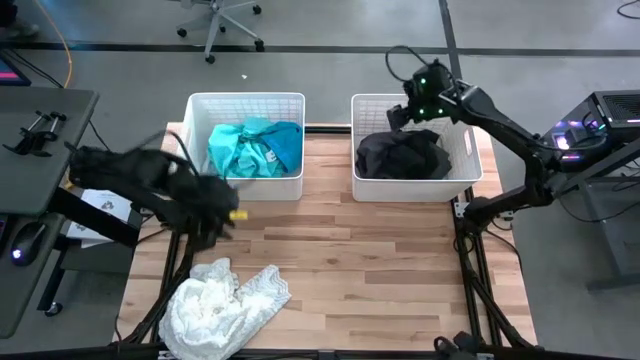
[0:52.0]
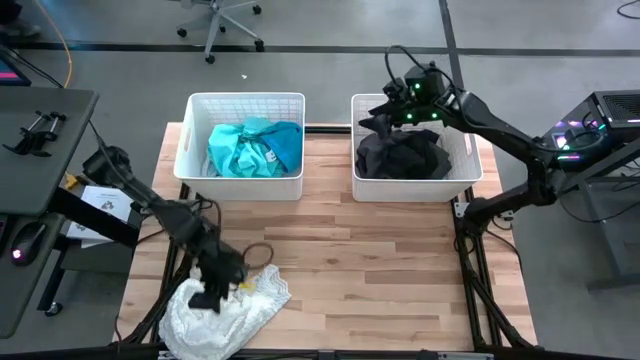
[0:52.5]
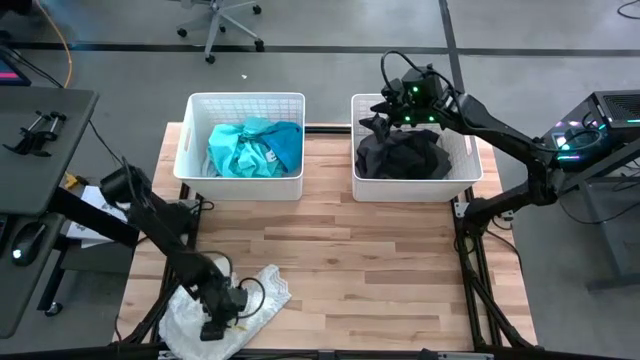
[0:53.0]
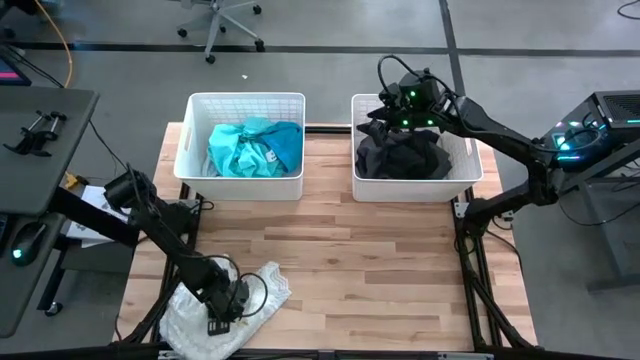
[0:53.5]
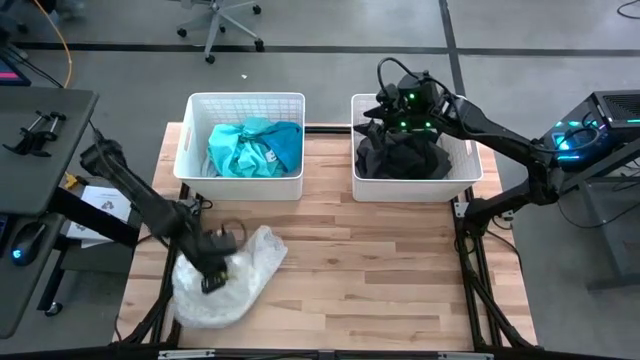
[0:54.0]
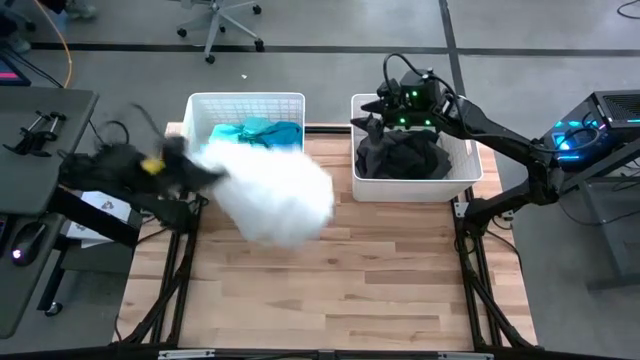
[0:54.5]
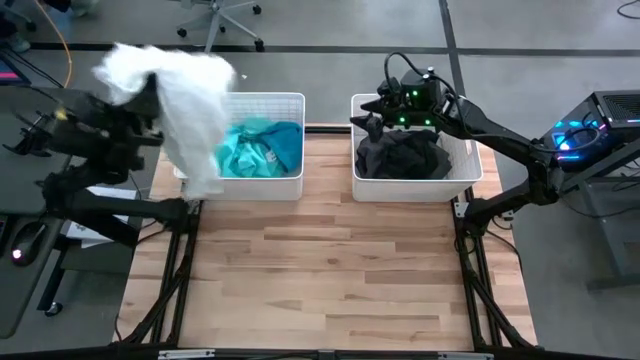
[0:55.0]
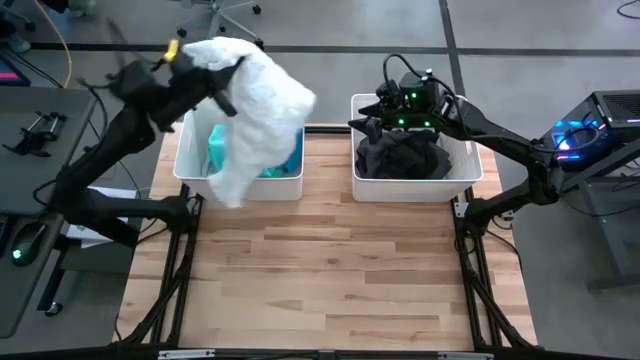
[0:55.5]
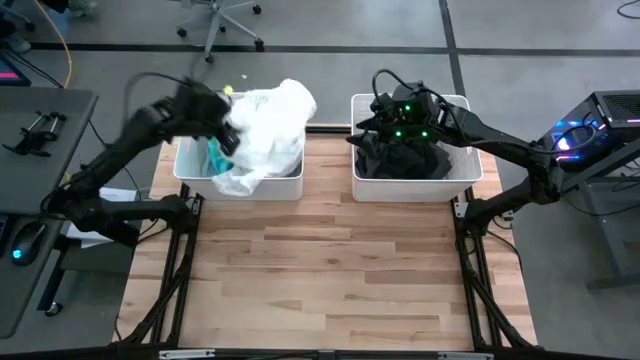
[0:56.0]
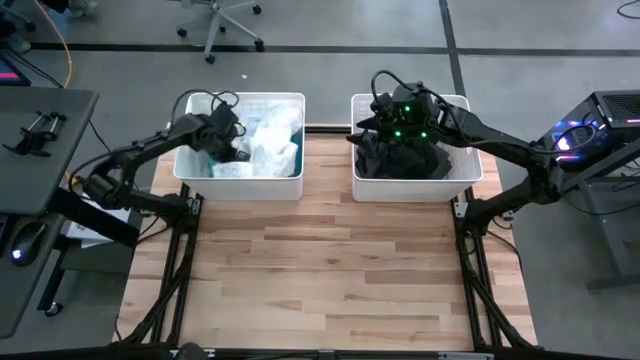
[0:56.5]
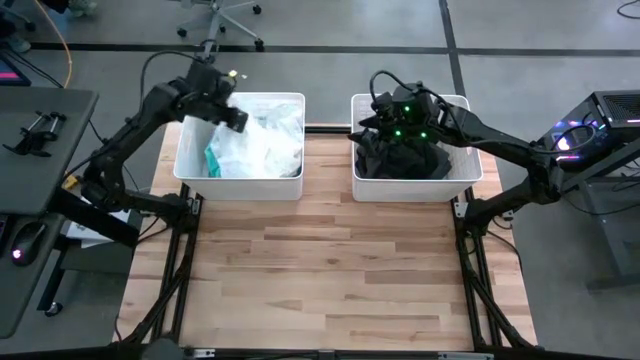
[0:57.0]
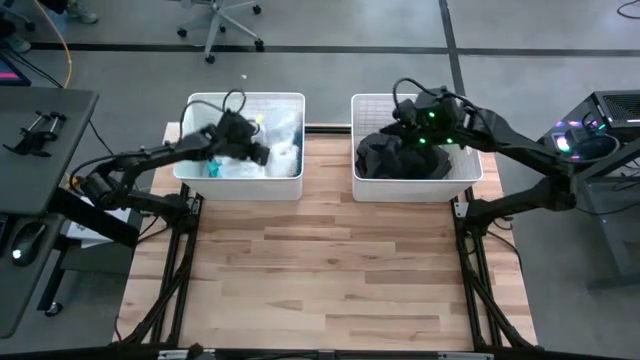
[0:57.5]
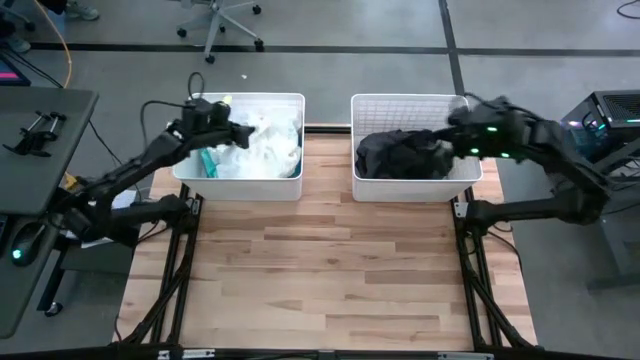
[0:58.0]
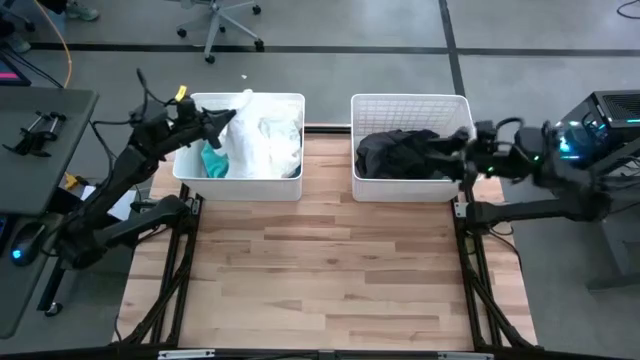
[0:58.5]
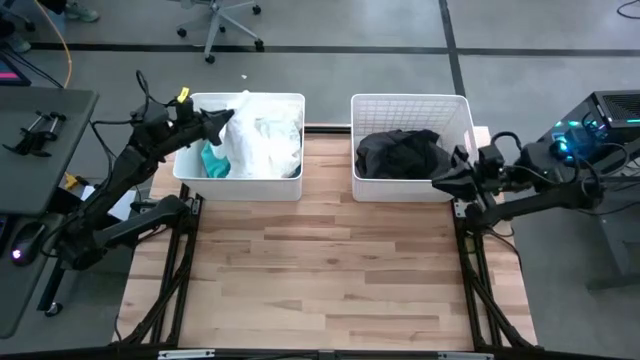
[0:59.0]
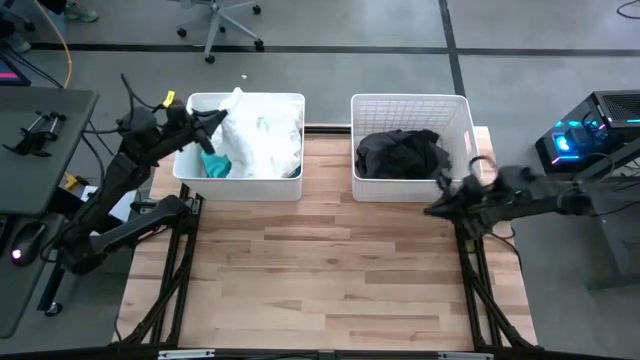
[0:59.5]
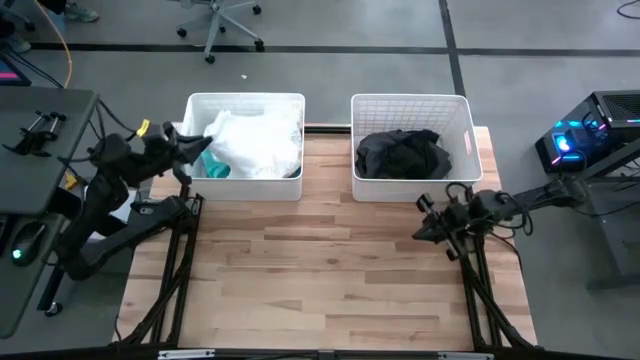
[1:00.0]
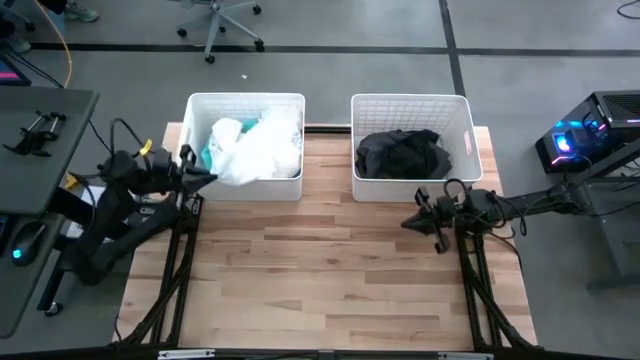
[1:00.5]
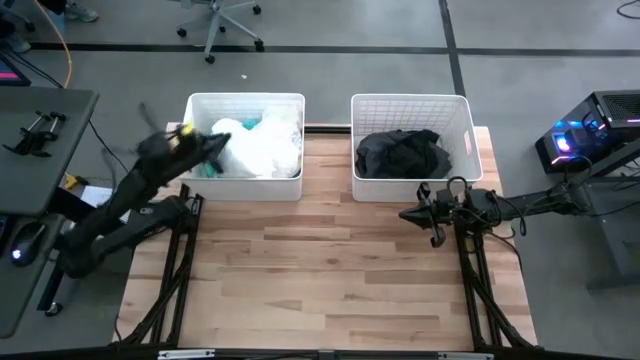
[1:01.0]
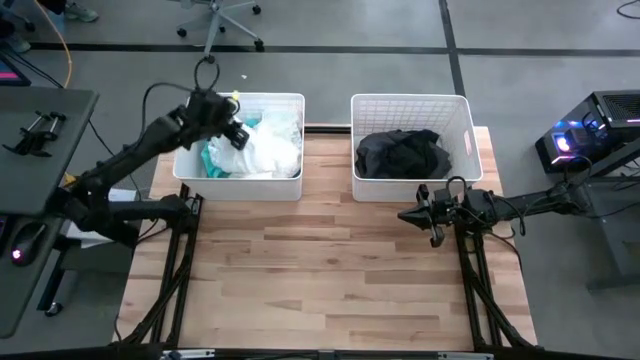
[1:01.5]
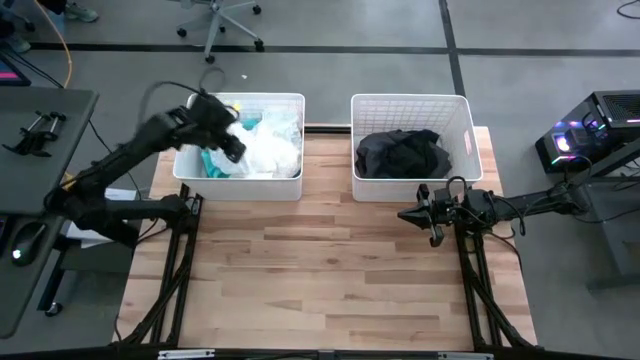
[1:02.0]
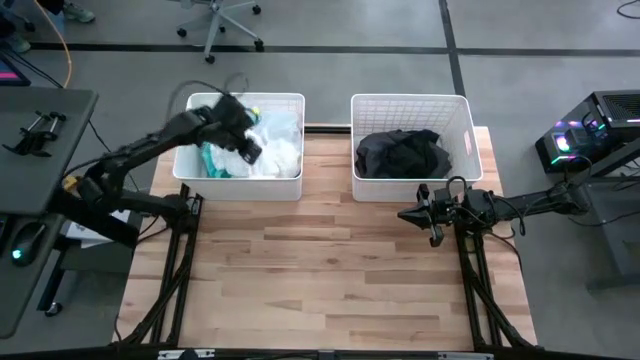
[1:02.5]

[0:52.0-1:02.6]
Task: Sort clothes
Put the white dress into the left white bin

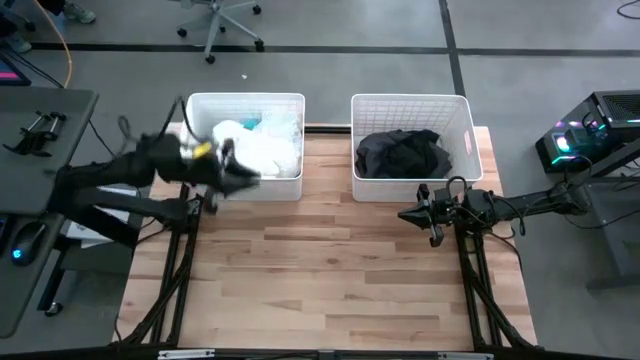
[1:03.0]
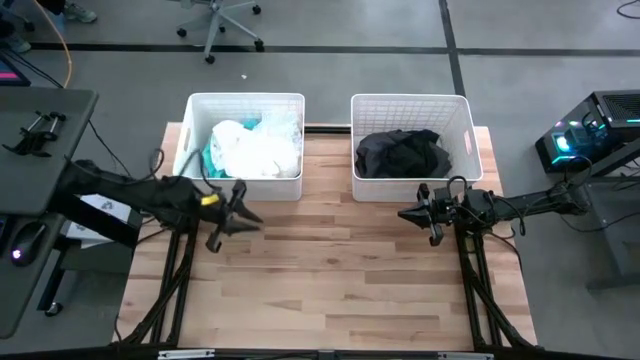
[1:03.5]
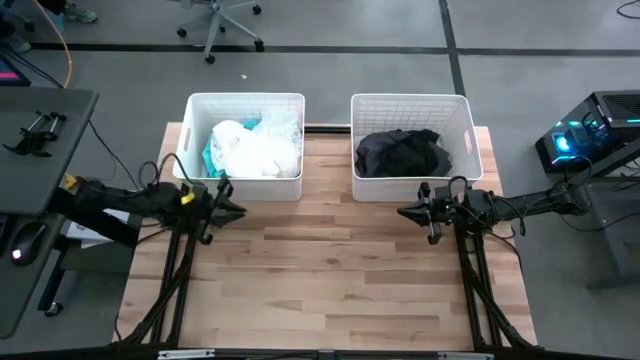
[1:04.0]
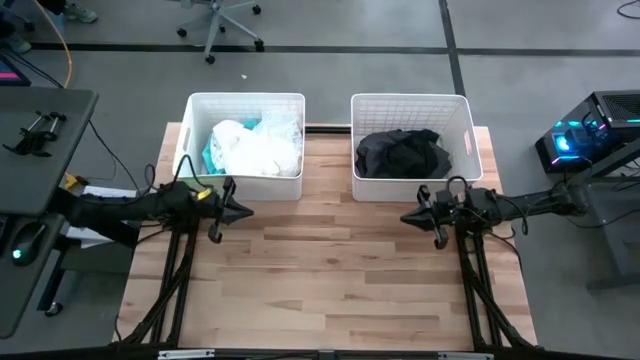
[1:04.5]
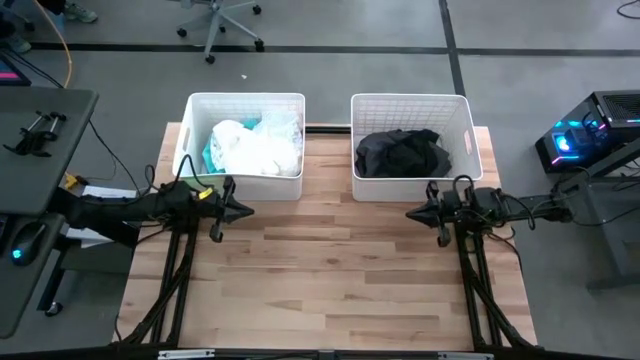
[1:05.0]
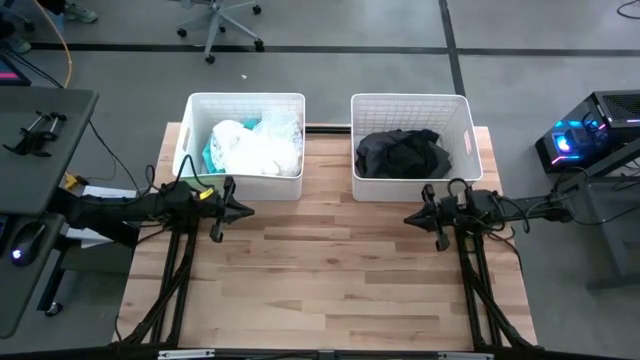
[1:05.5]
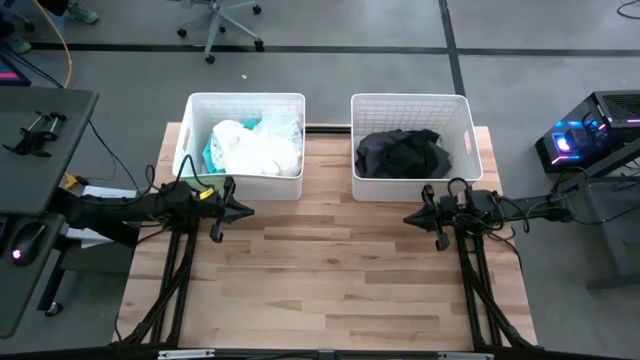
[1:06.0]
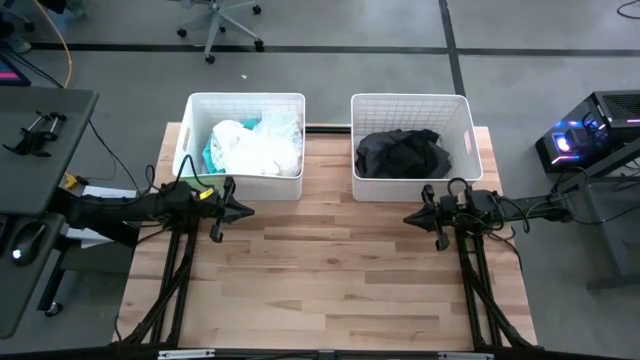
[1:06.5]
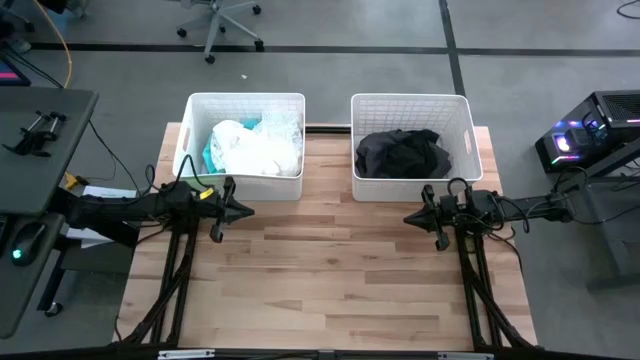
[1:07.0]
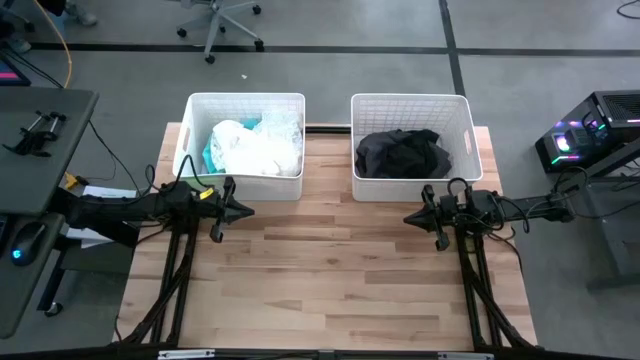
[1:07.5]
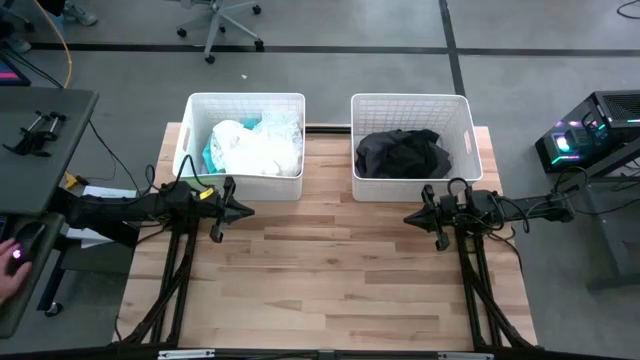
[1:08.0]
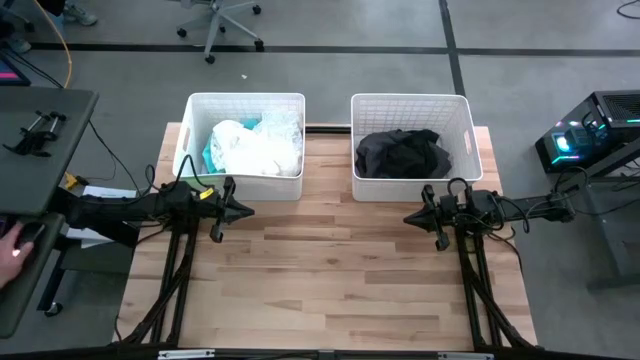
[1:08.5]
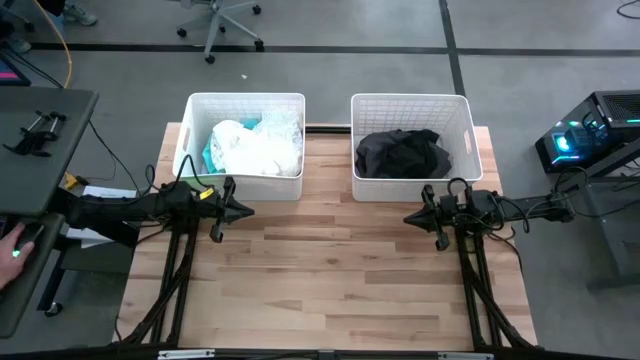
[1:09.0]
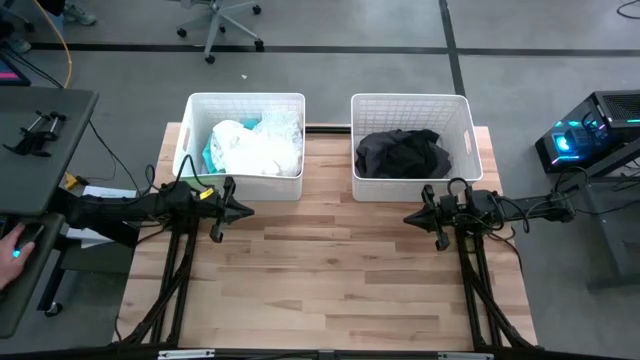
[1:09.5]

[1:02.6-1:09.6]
Return to Home Position

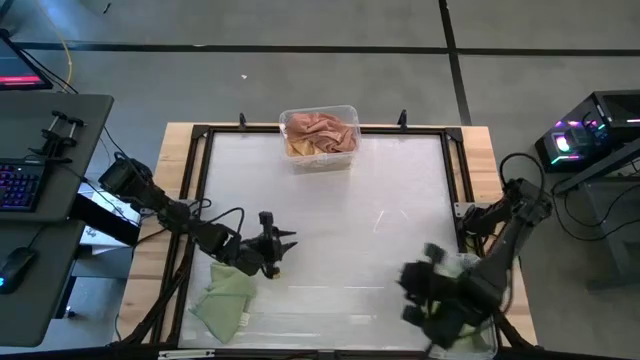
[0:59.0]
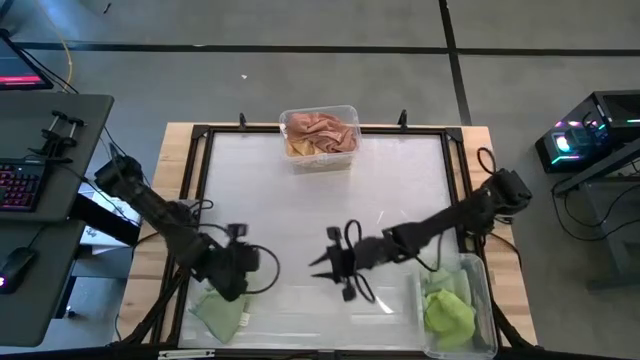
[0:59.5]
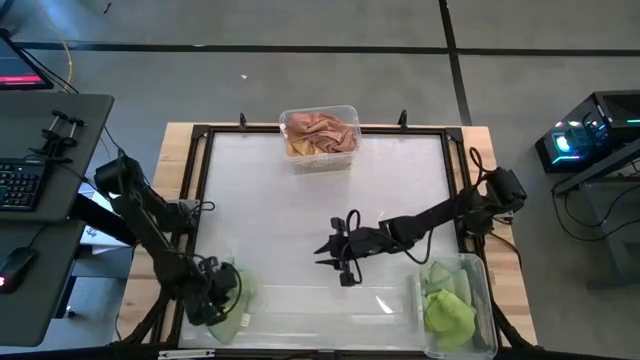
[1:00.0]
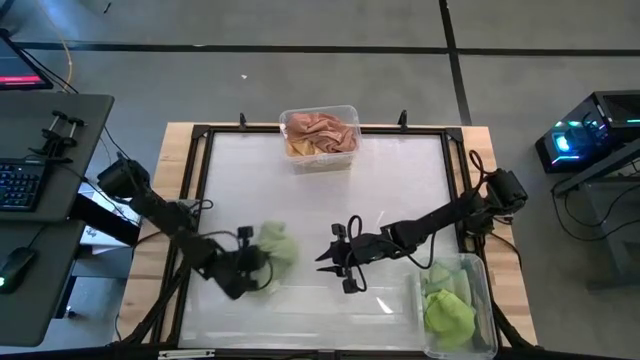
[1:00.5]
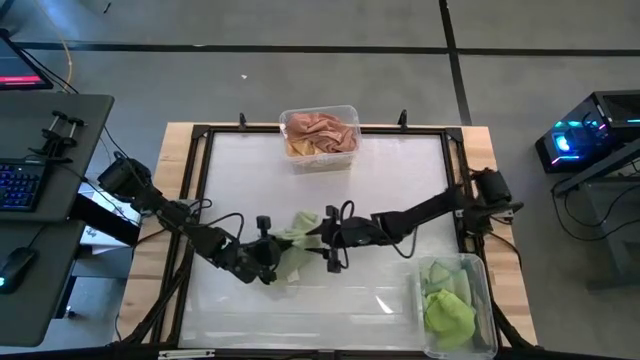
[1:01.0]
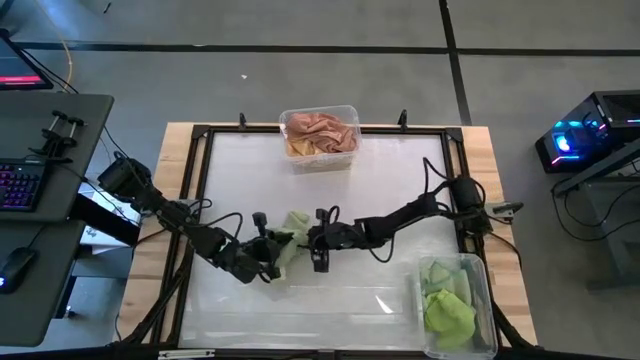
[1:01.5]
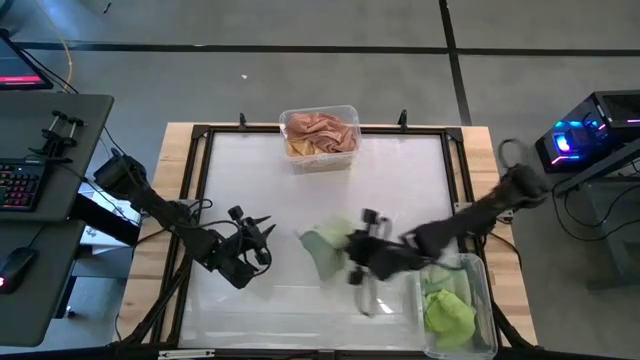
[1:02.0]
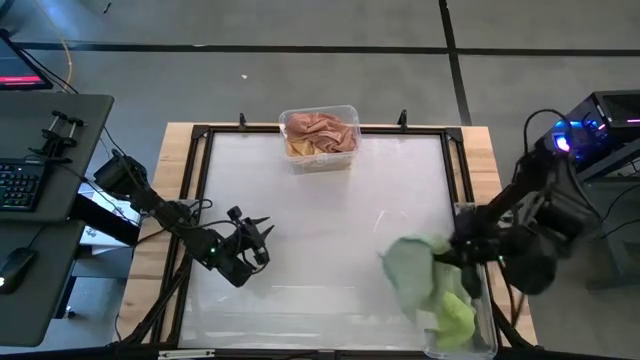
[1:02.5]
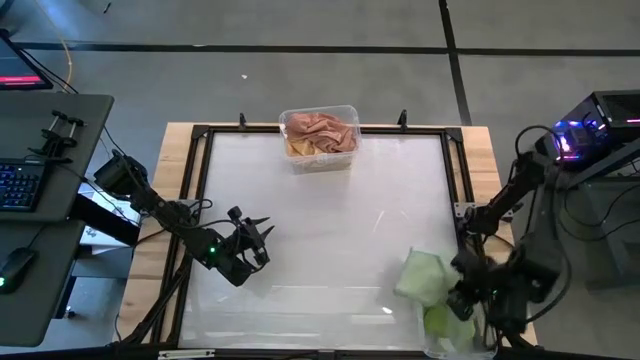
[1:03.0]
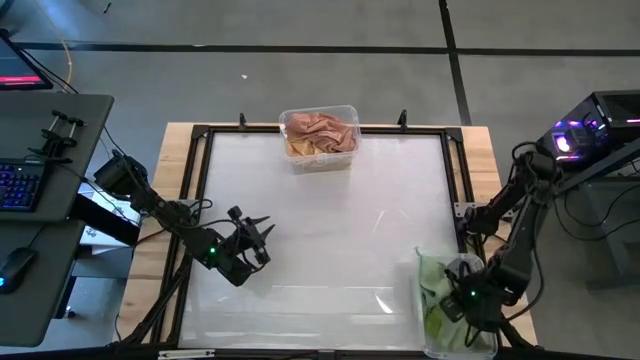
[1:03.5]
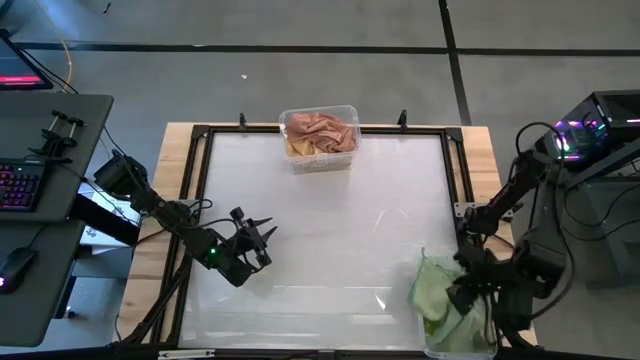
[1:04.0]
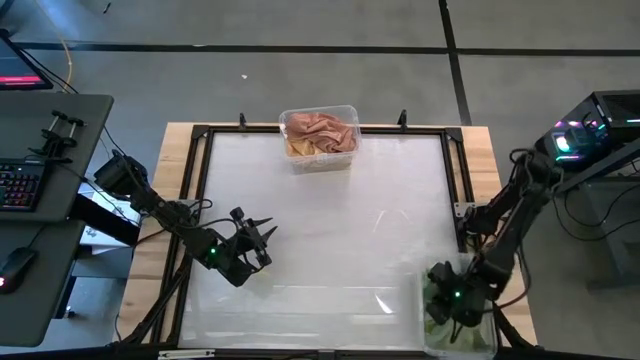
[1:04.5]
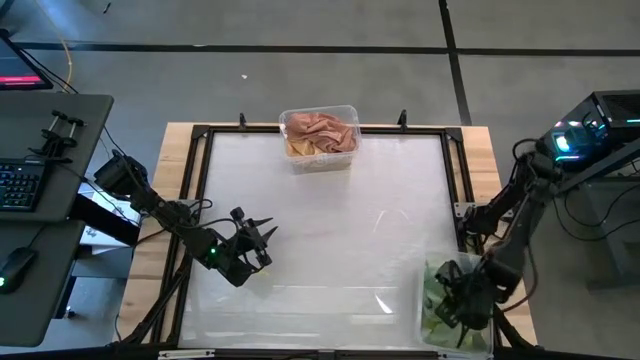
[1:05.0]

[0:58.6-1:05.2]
Task: Sort towels by color in basket
Put the green towel into the bottom transparent bin
